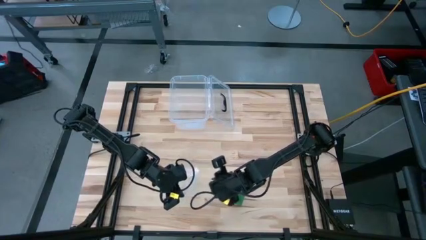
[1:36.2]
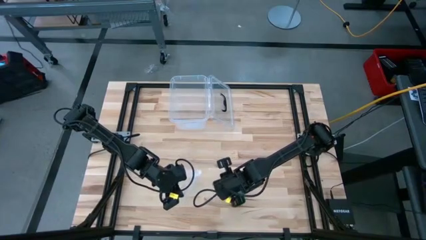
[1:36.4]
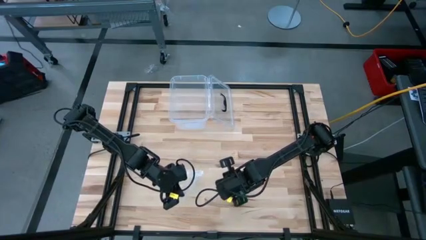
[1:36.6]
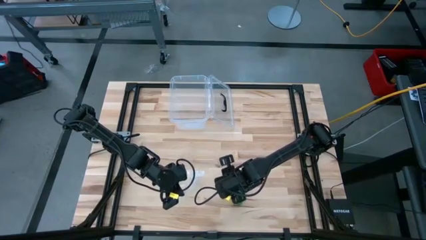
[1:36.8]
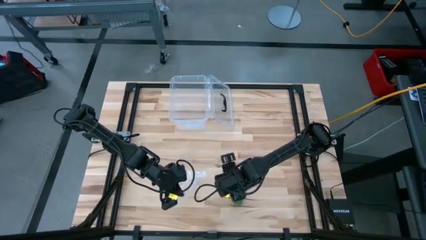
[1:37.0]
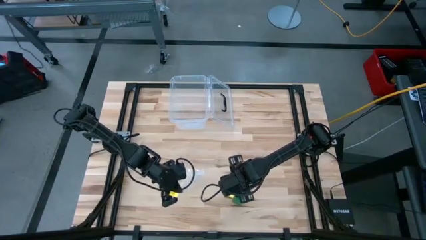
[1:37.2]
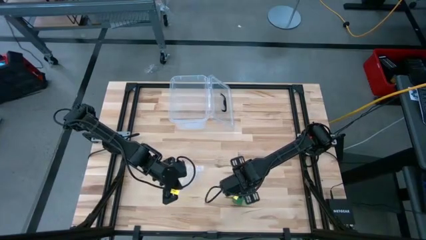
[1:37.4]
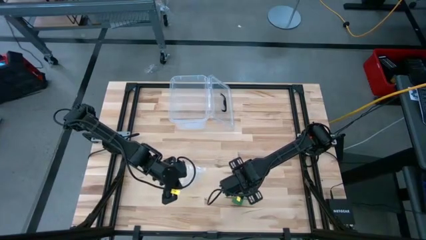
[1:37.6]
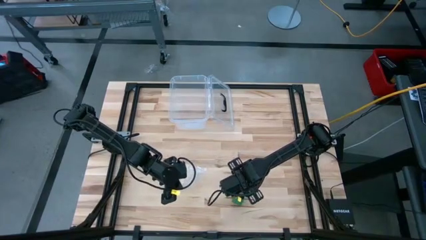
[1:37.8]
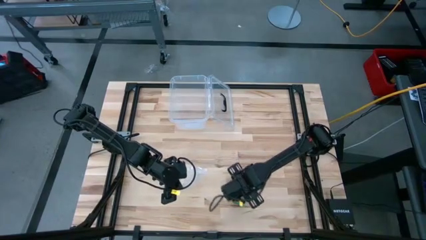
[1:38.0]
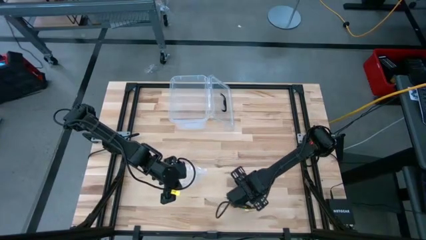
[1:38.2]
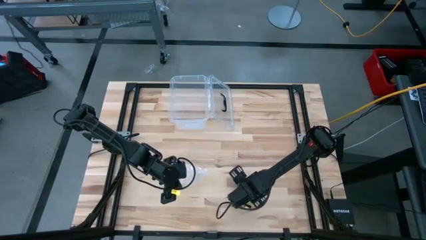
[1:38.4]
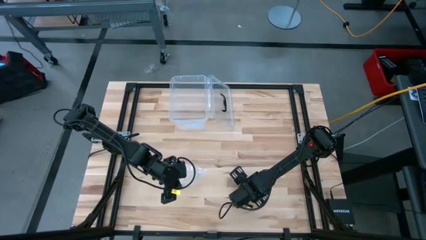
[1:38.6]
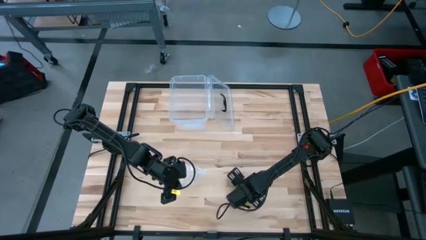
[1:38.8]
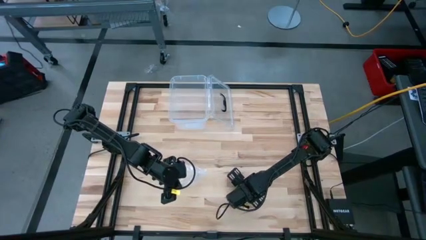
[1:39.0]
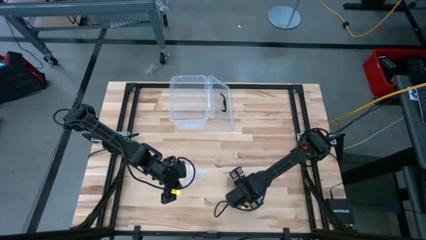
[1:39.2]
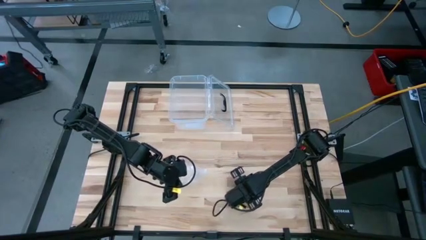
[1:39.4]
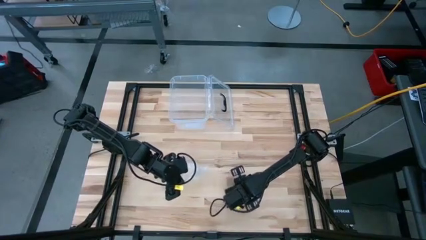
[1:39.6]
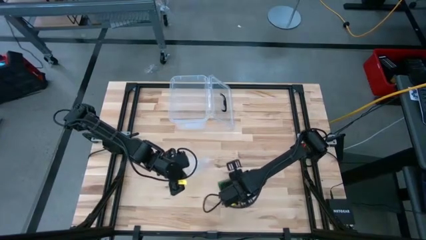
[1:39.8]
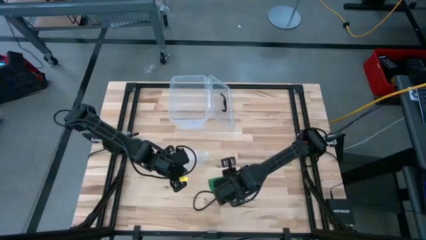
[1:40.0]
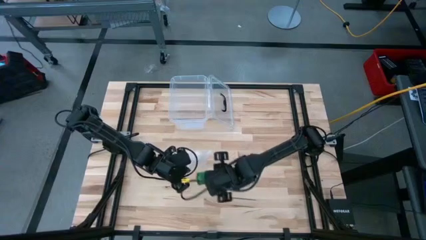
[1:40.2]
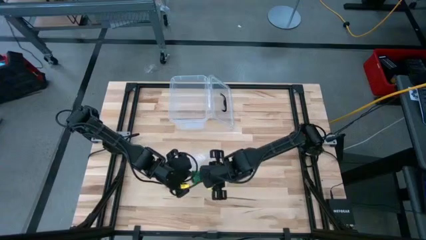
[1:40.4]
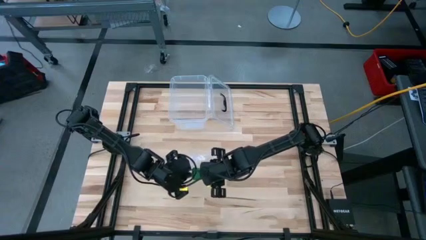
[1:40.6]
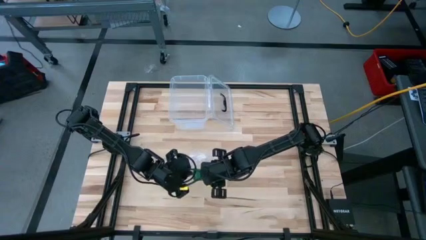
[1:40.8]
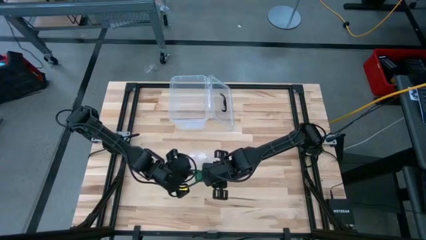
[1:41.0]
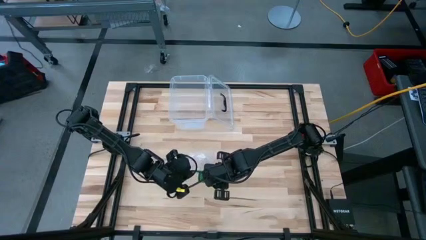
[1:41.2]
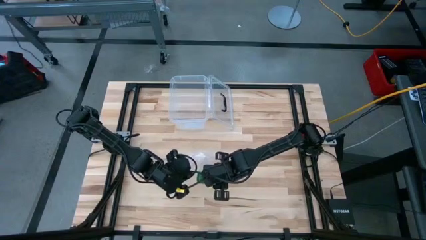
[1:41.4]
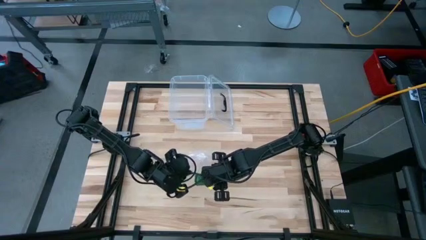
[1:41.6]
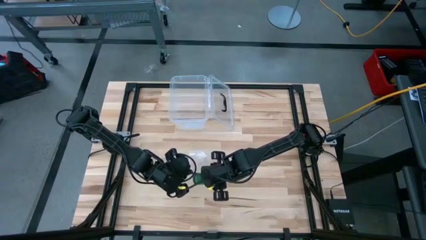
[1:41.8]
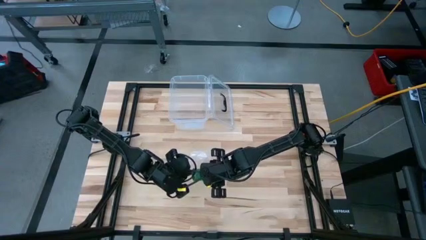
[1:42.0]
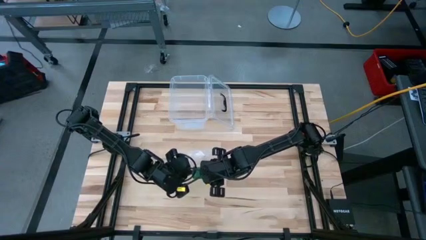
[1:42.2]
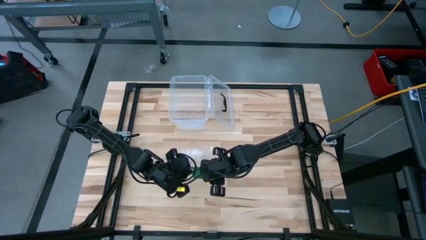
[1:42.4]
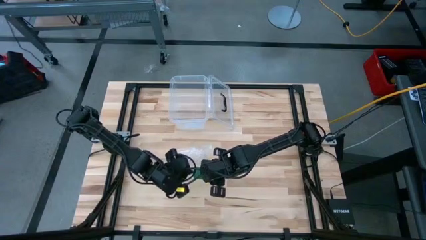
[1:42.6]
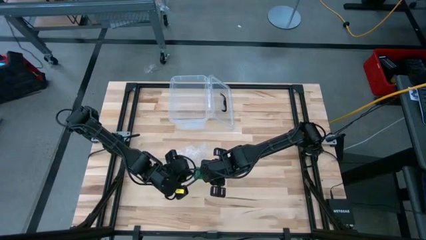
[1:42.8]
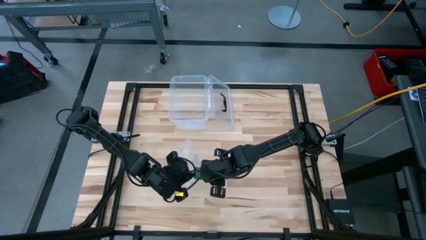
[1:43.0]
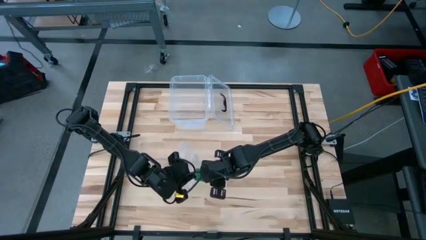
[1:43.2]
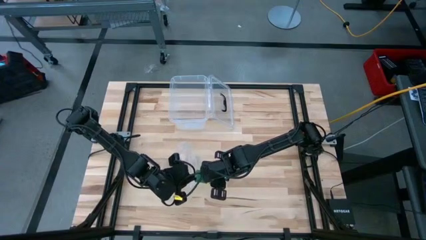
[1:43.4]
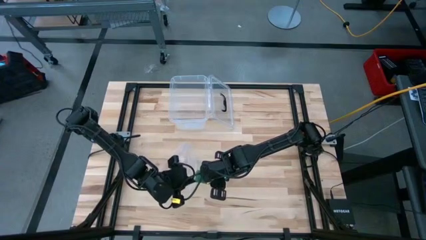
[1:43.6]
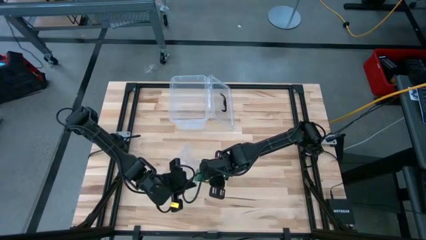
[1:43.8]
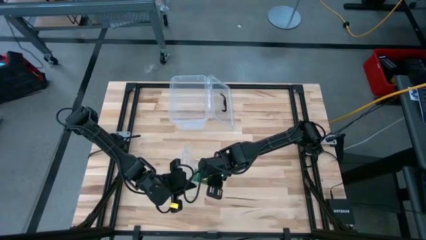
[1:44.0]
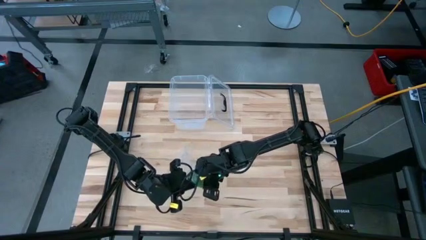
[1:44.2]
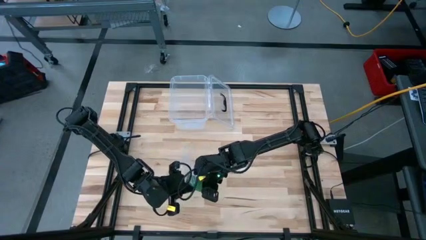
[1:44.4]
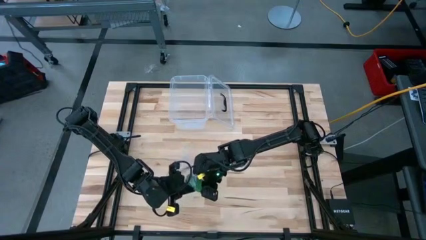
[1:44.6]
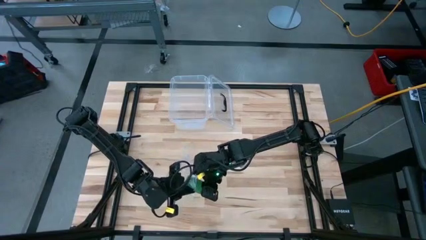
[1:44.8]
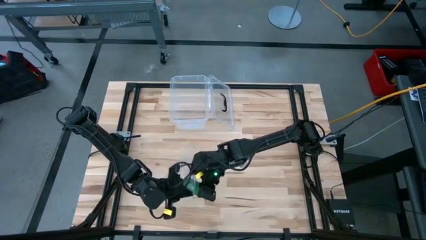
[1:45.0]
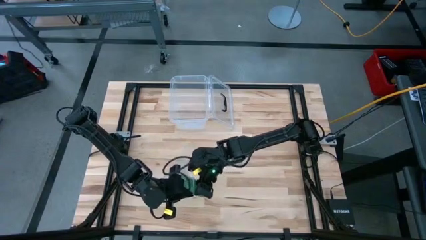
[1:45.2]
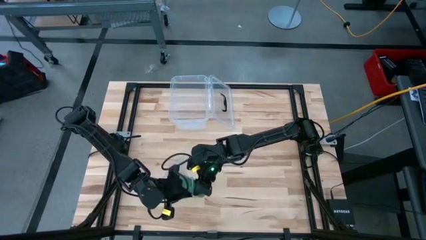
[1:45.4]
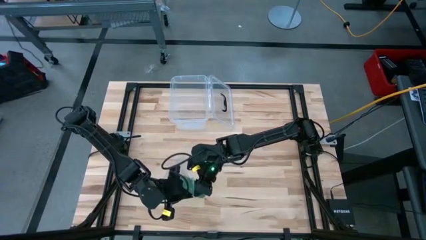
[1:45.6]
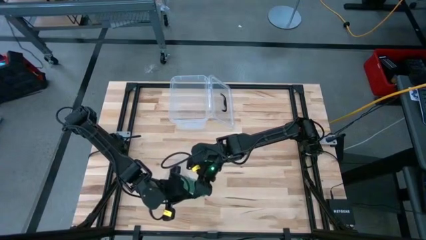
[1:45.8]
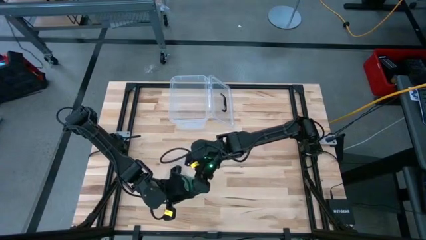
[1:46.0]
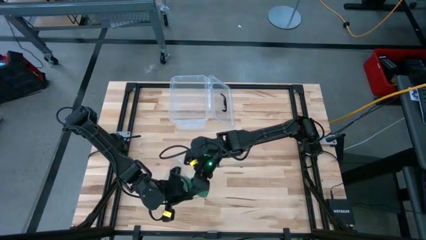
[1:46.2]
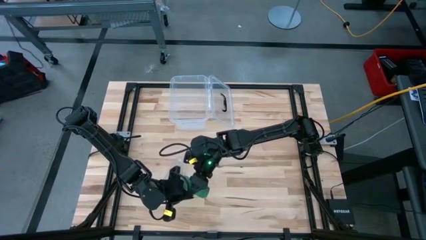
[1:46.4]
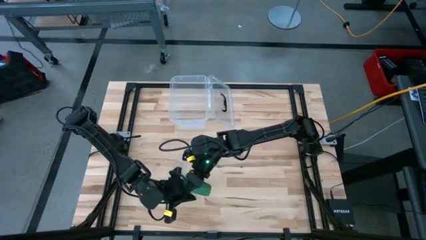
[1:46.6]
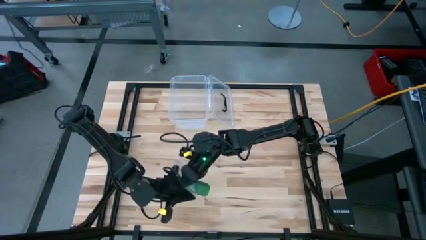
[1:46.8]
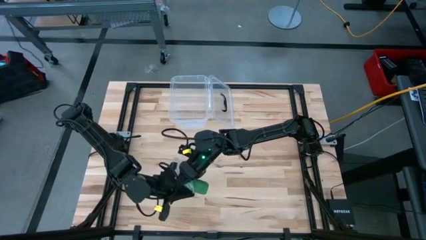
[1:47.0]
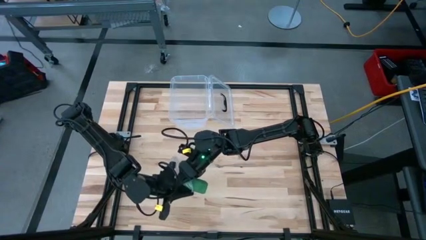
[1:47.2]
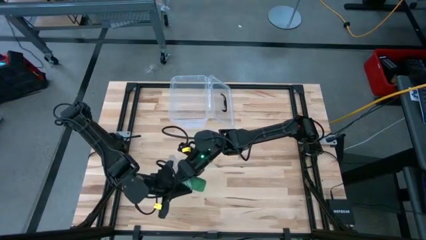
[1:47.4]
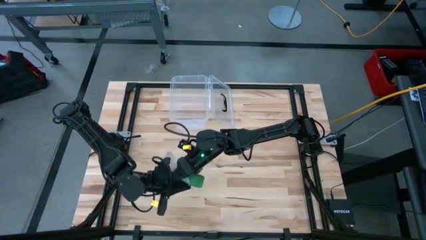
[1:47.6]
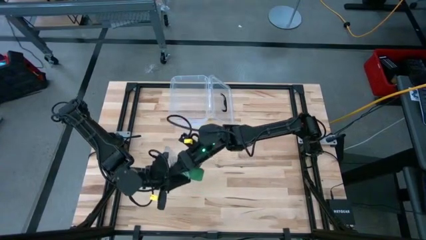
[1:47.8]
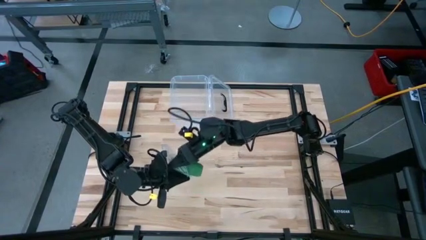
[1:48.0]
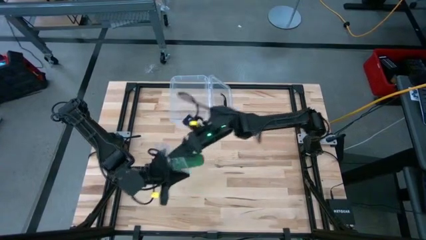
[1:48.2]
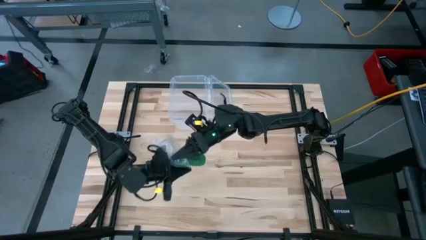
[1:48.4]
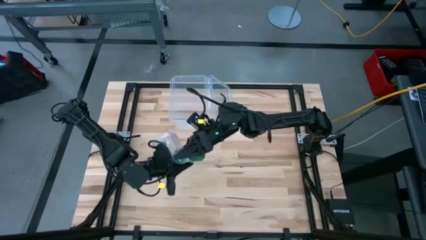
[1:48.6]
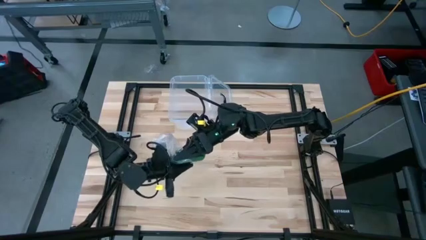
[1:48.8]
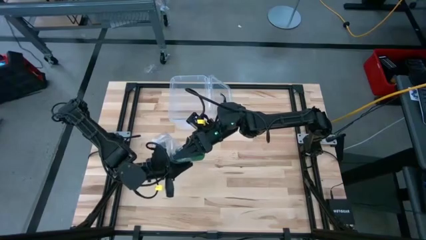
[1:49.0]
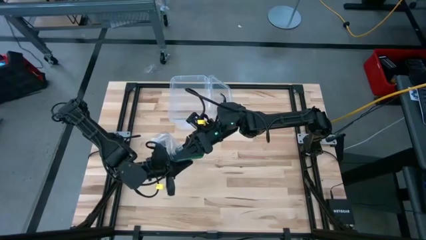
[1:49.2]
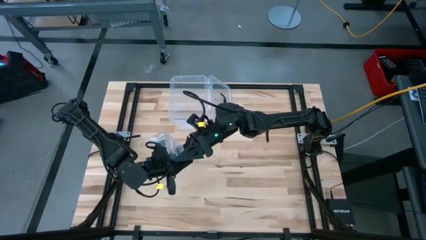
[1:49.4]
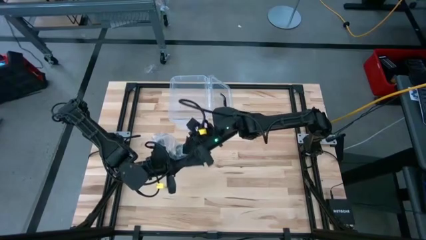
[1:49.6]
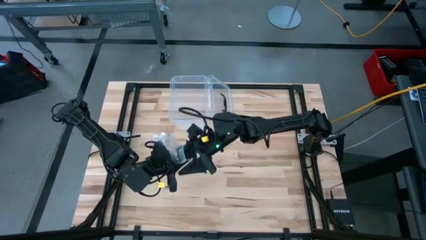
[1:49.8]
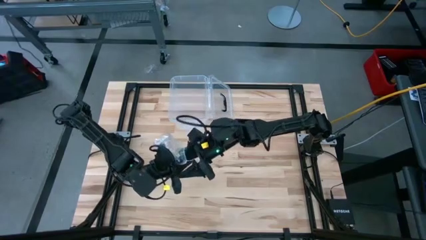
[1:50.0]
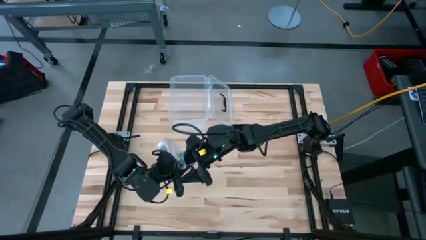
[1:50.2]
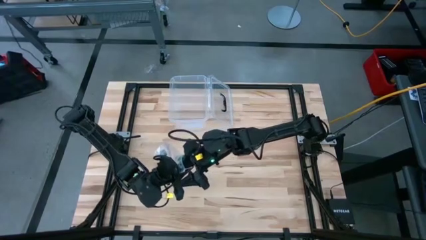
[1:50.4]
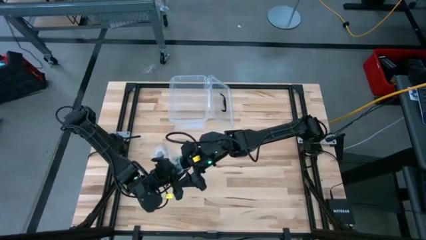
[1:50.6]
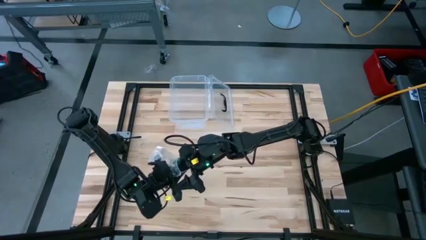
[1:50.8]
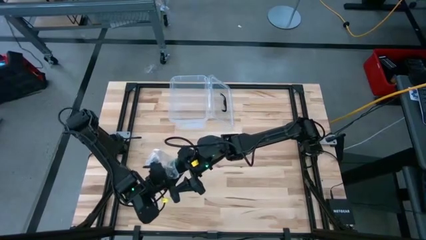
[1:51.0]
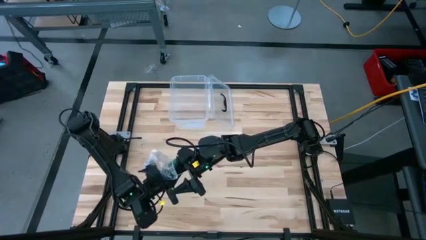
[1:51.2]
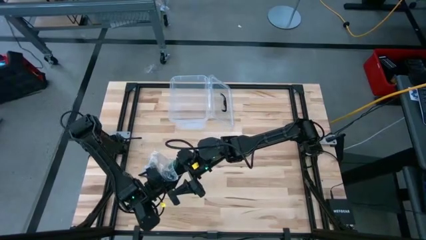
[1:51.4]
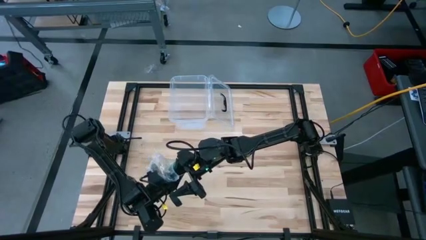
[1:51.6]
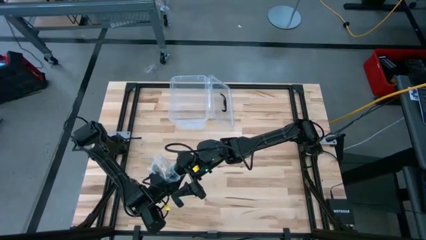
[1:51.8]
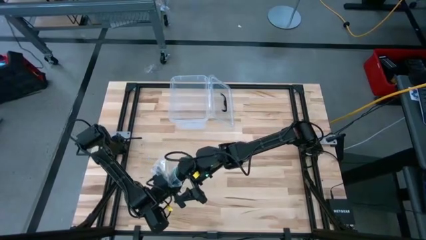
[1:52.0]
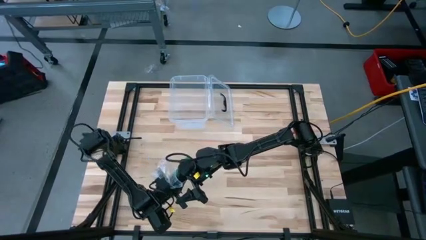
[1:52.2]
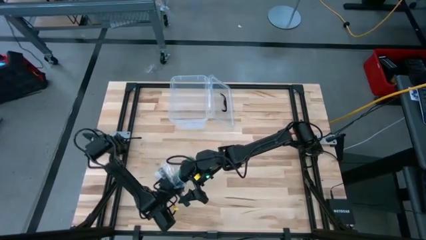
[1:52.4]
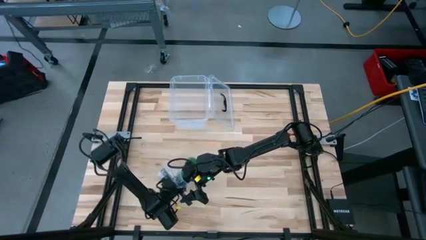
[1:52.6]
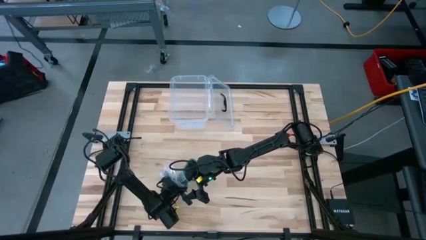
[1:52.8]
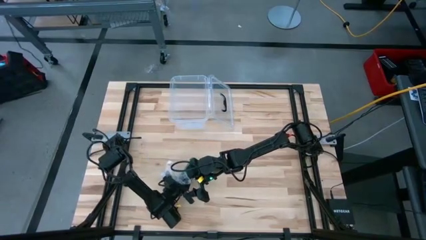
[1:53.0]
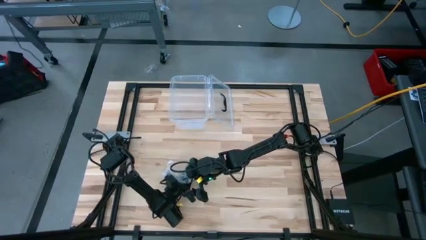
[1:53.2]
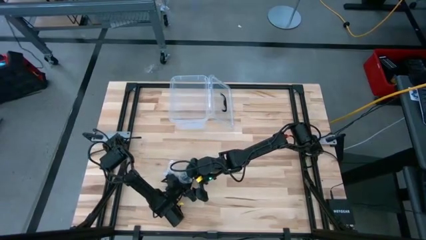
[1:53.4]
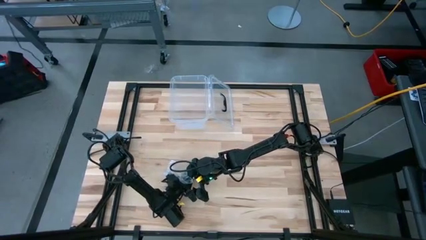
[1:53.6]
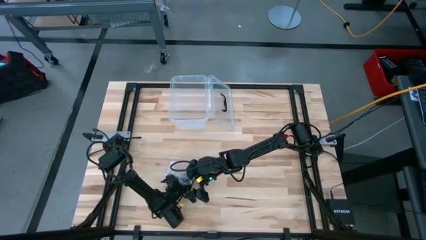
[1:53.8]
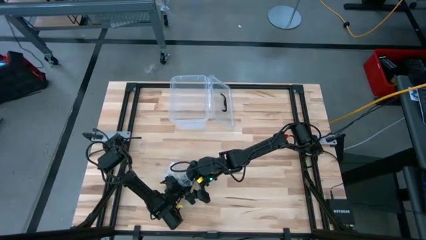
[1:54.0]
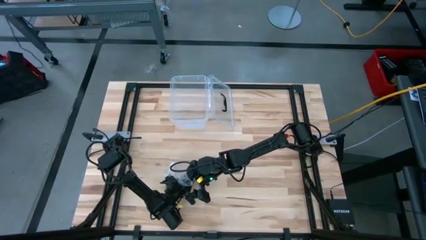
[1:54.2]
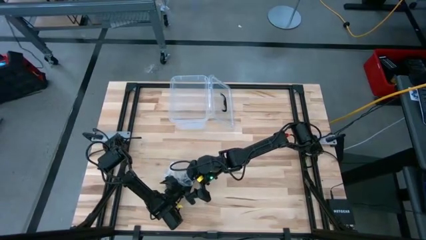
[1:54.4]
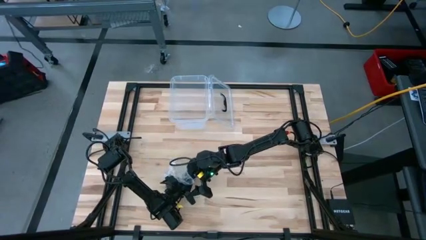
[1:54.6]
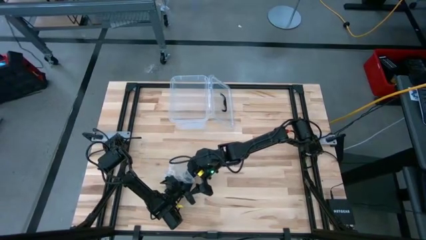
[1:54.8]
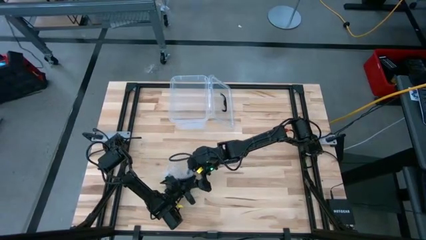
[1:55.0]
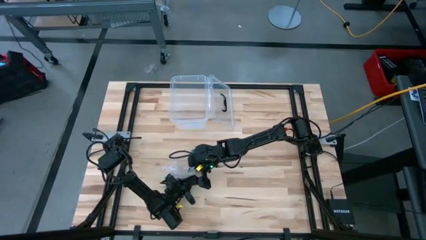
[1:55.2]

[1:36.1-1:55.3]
Task: Roll bandage
Put the green bandage into the transparent zip bag
